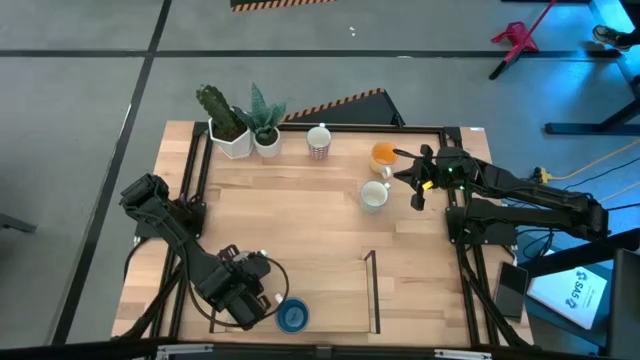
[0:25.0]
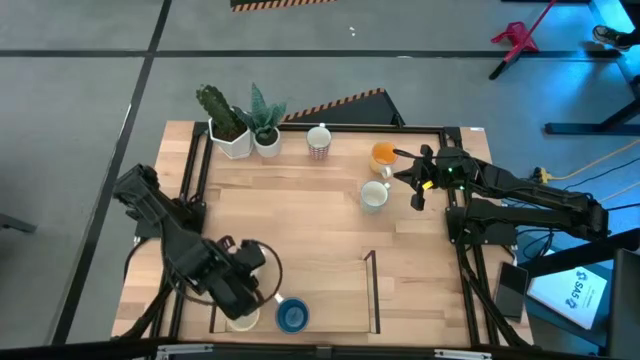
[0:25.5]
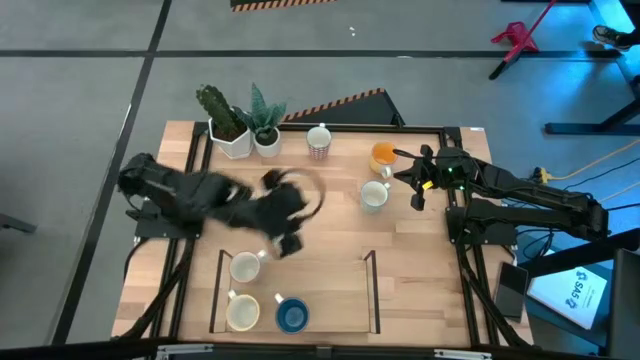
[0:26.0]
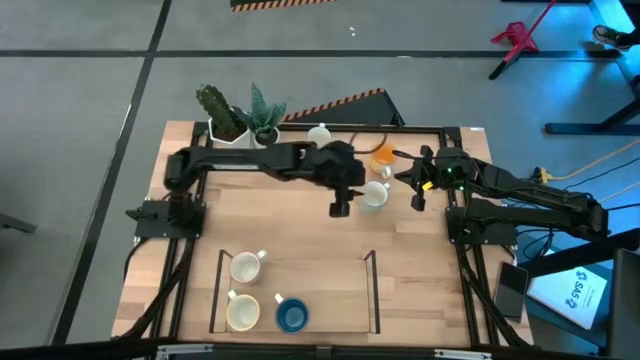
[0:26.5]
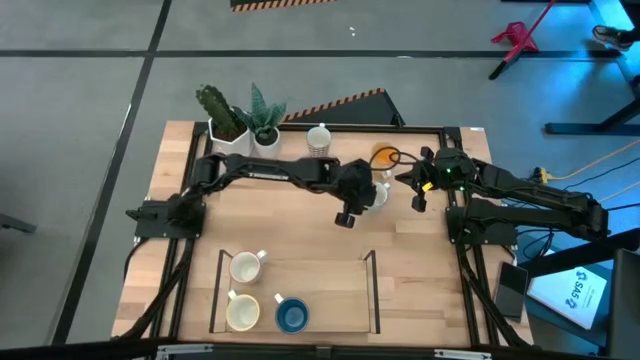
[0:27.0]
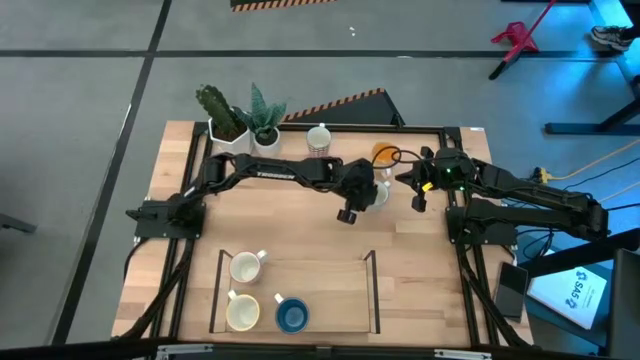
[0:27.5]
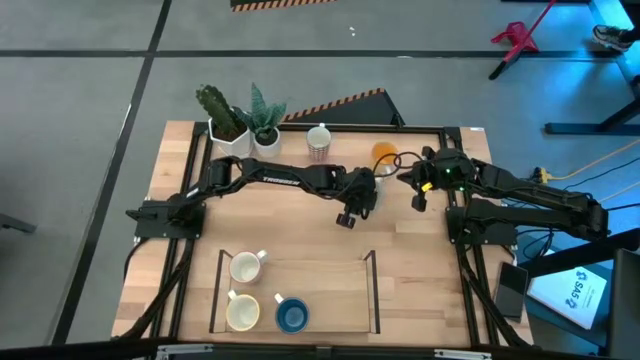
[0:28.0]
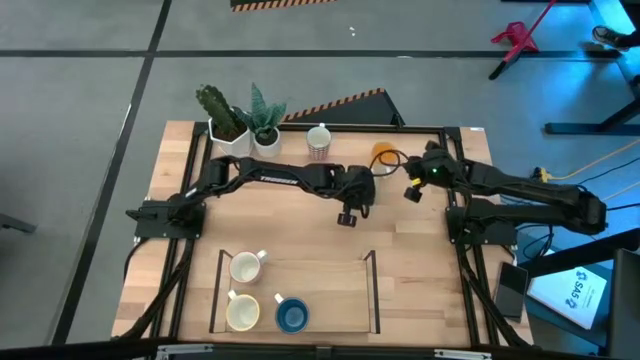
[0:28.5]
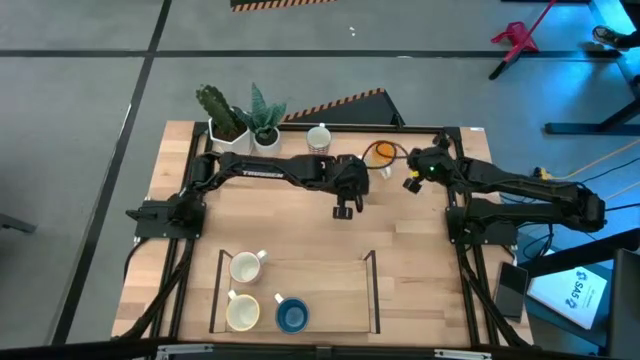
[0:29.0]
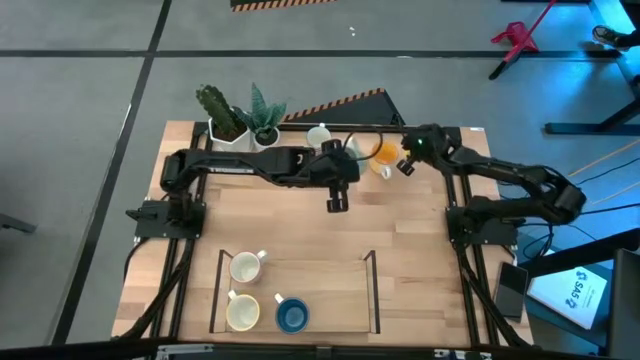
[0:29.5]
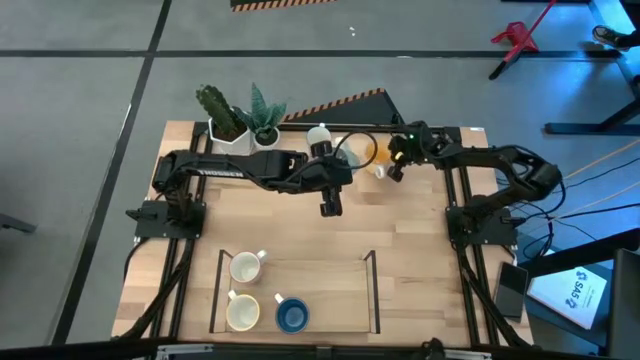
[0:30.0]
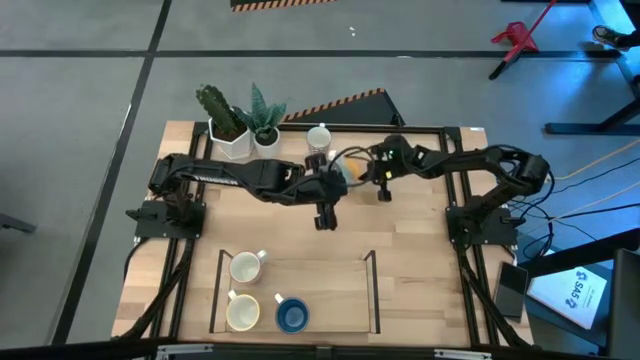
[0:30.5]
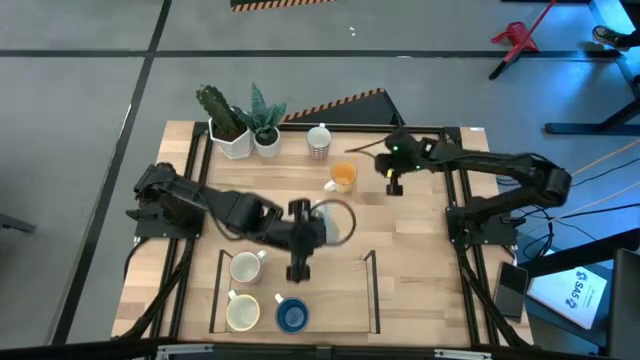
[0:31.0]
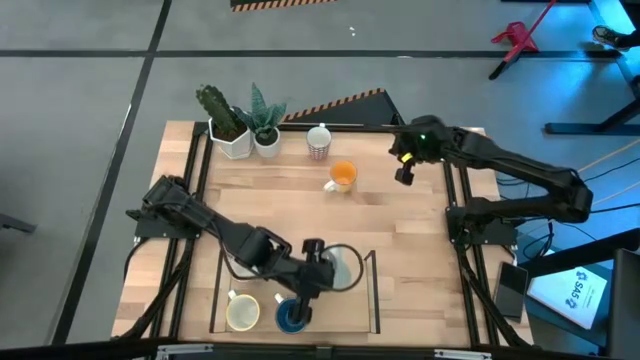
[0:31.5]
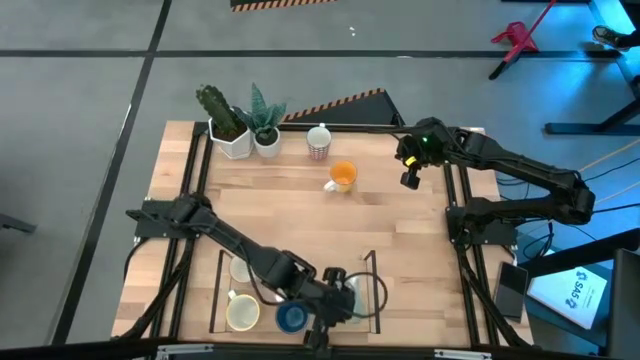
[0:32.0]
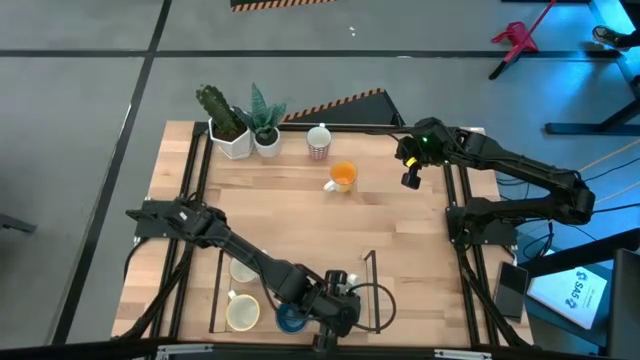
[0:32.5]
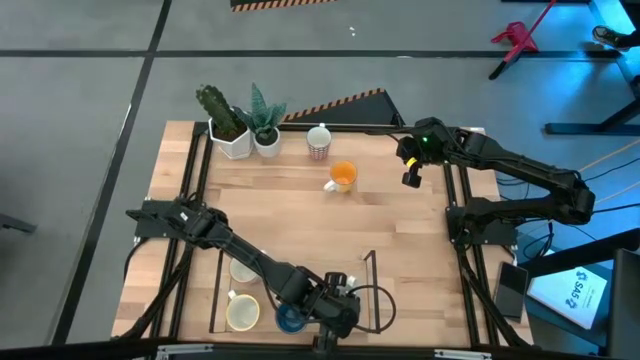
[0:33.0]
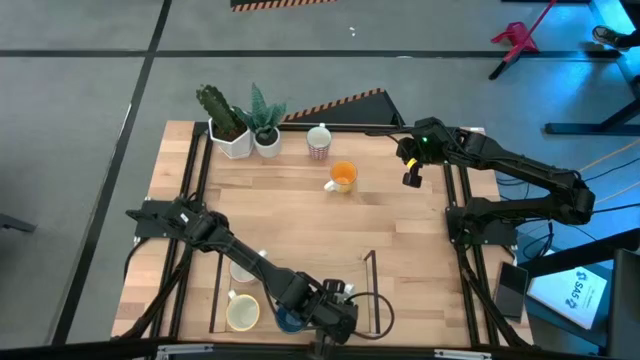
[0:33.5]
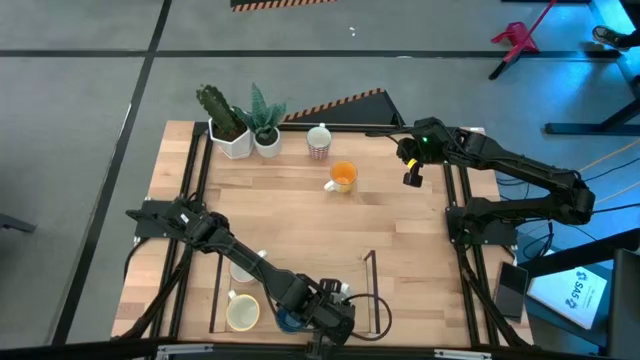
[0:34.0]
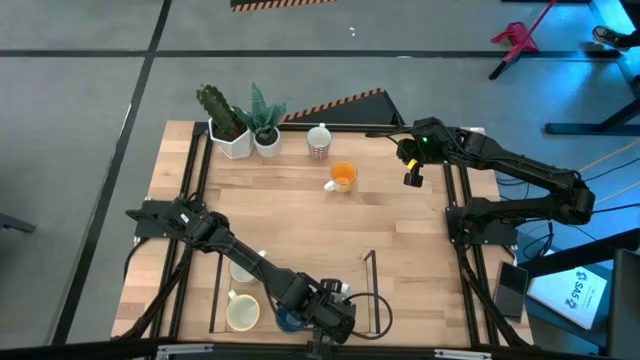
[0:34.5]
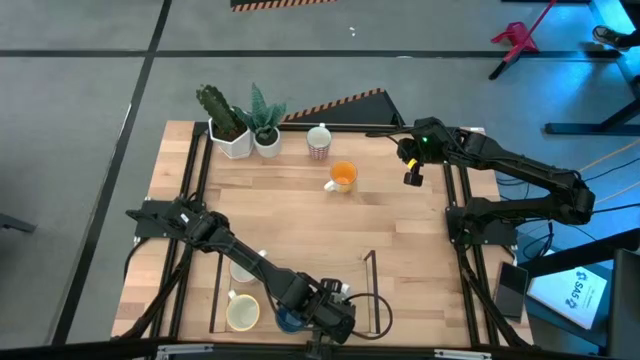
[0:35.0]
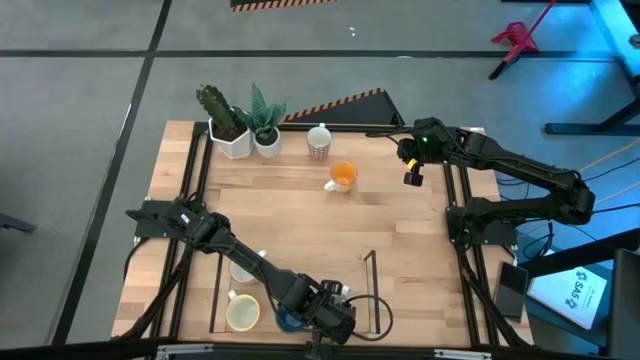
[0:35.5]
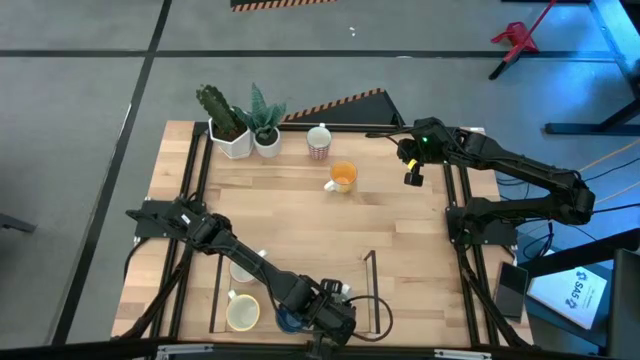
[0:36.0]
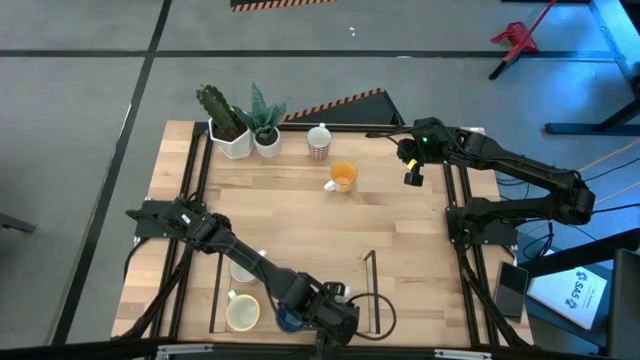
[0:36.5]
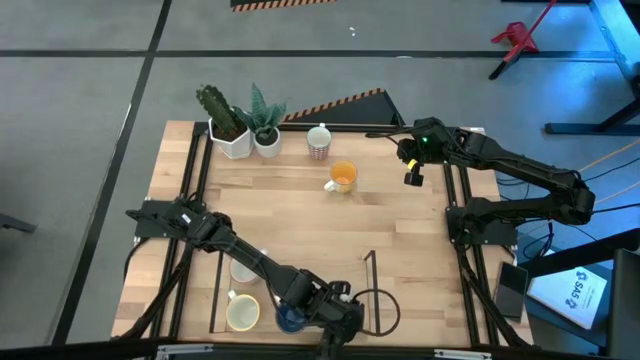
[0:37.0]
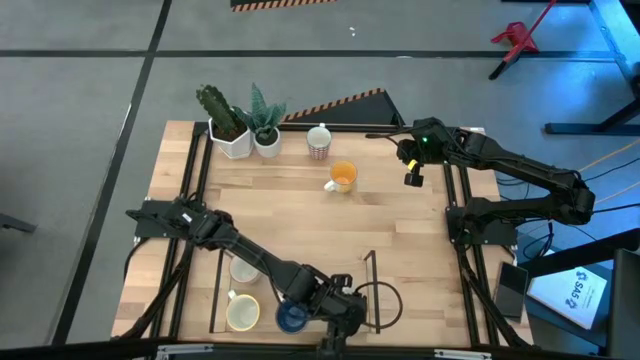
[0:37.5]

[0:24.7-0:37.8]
Task: Place coffee mugs
Put the green patterned mug on the shelf

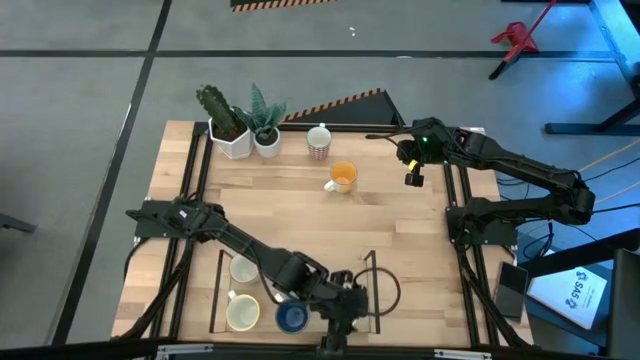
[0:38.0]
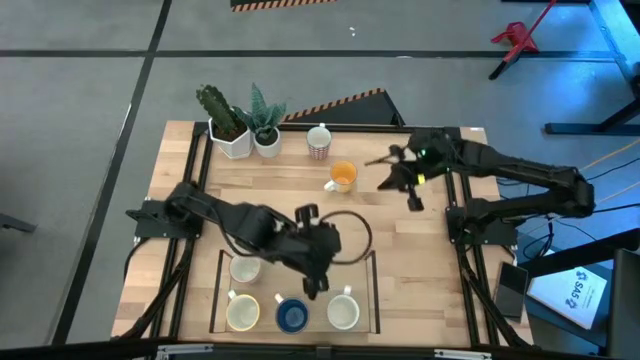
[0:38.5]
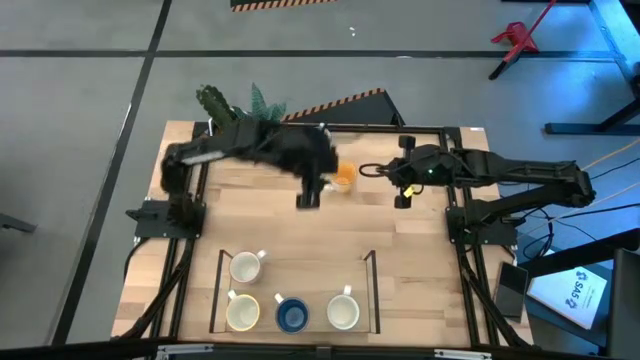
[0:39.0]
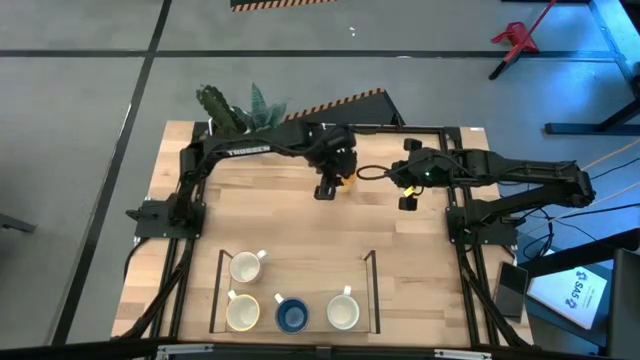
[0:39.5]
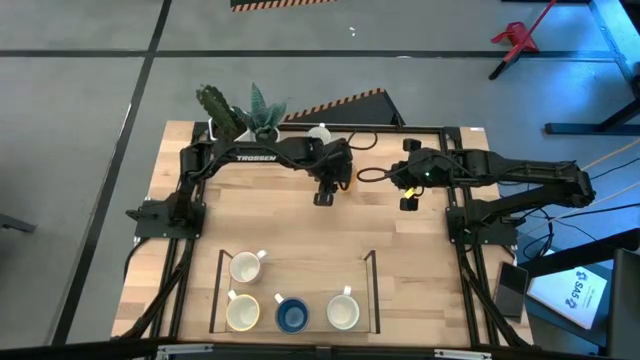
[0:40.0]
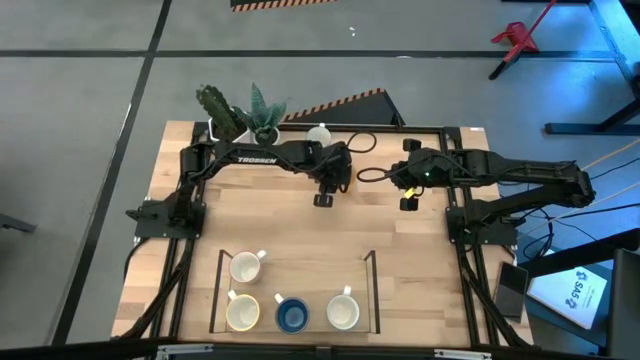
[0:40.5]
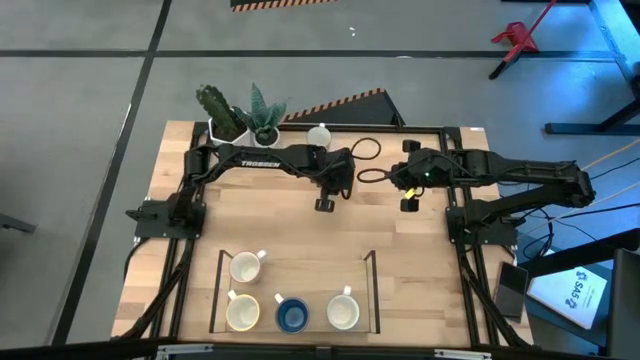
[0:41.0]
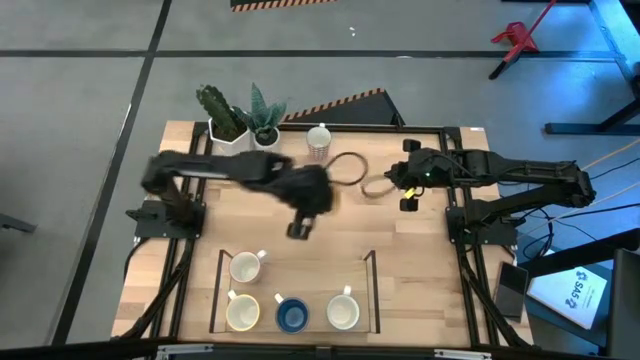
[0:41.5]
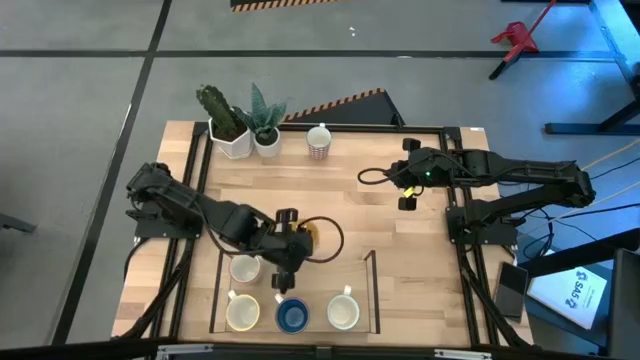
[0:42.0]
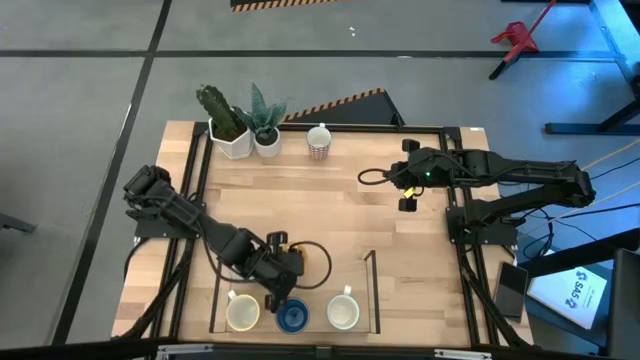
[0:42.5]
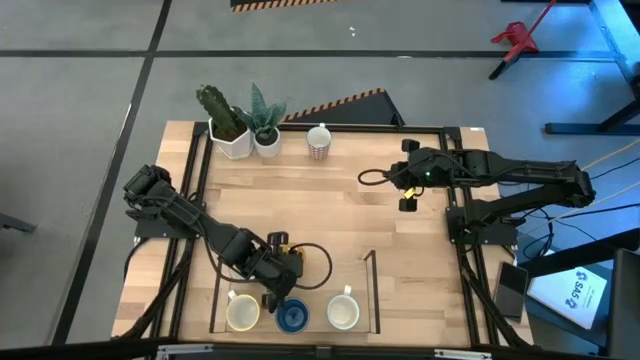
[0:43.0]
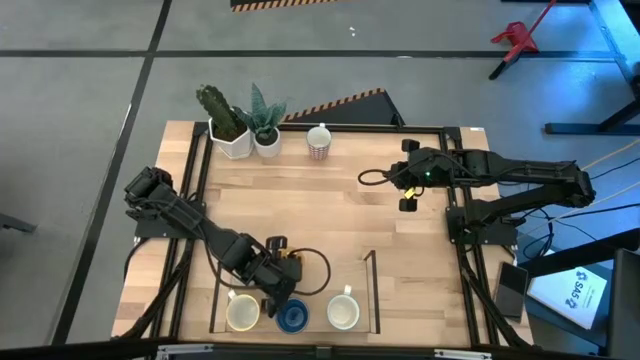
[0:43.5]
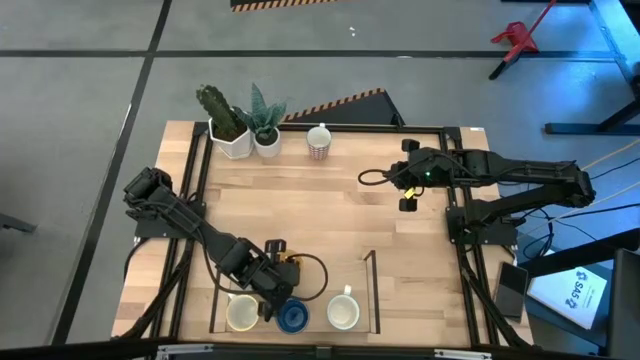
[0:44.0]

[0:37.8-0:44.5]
Put the yellow mug on the shelf

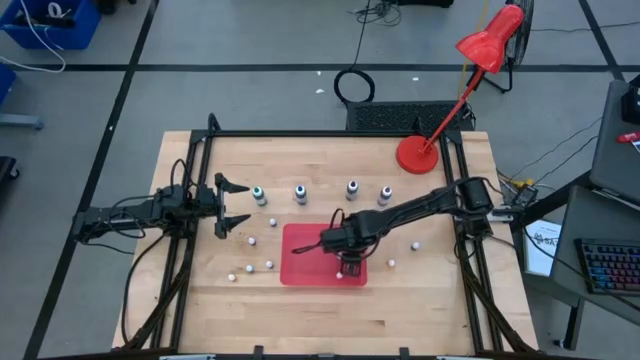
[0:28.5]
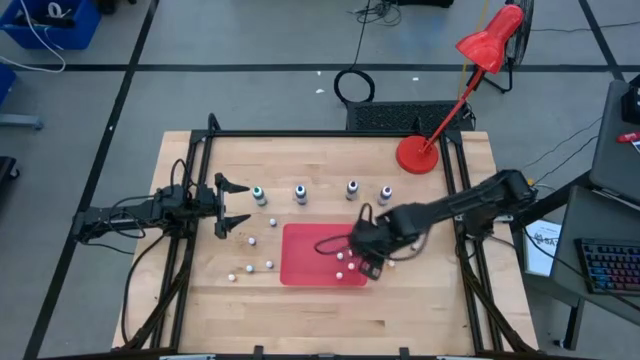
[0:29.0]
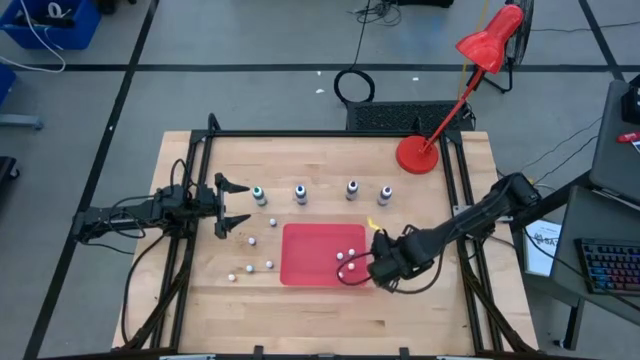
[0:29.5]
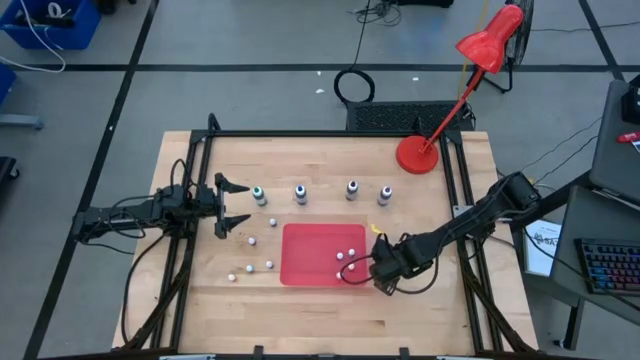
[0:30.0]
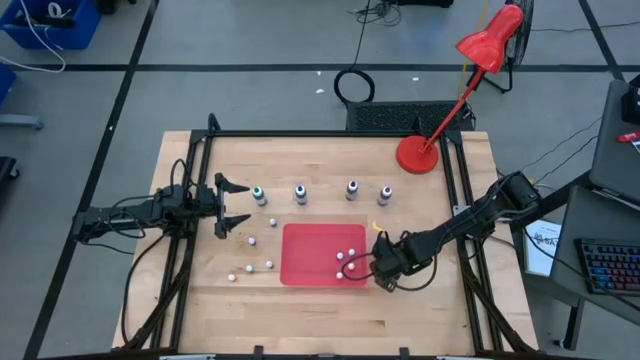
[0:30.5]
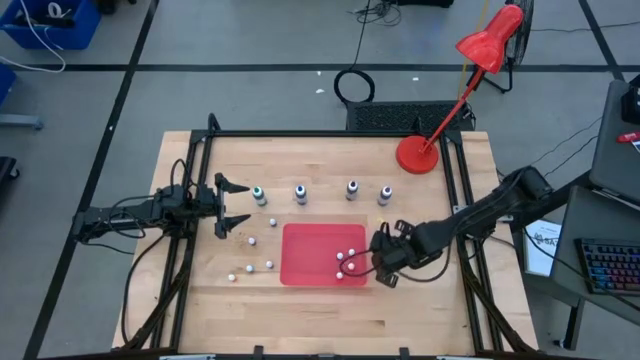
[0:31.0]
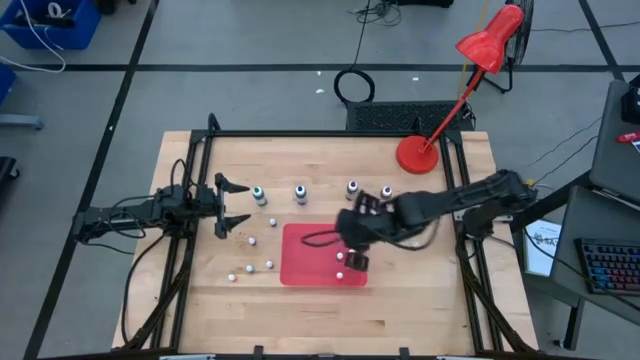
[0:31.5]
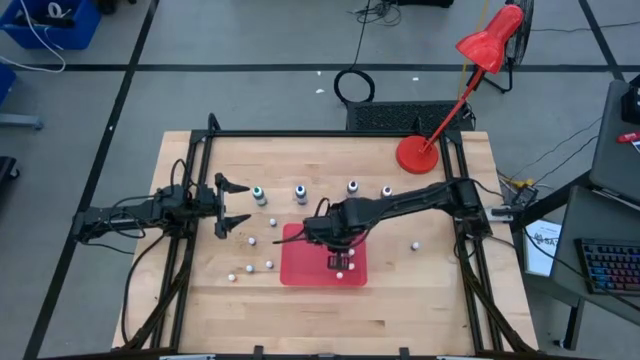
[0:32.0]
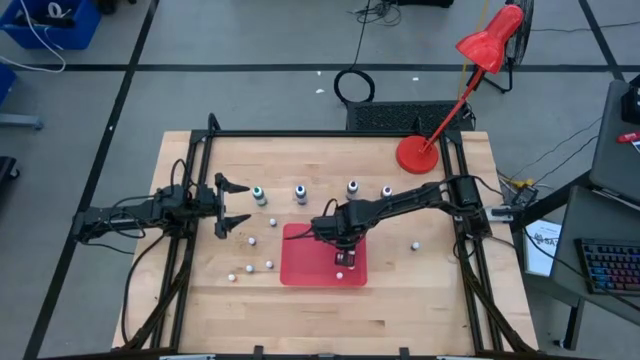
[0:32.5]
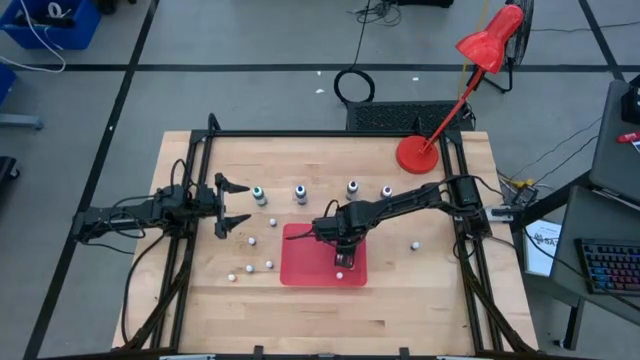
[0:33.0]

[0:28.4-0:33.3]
Task: Pick & Place food coloring
Put the small orange food coloring bottle into the pink bin
